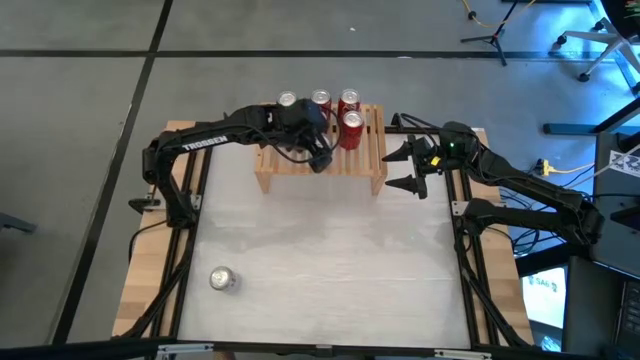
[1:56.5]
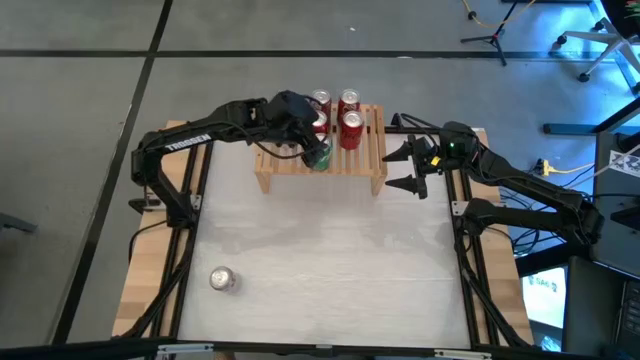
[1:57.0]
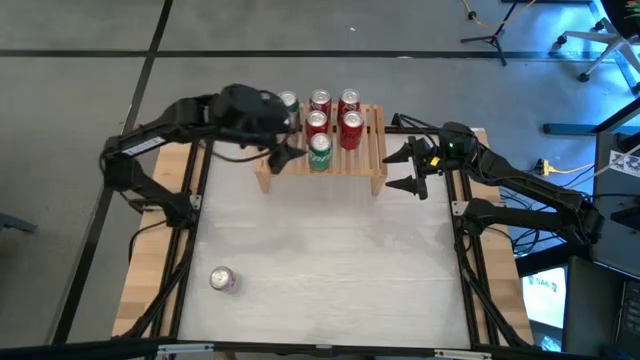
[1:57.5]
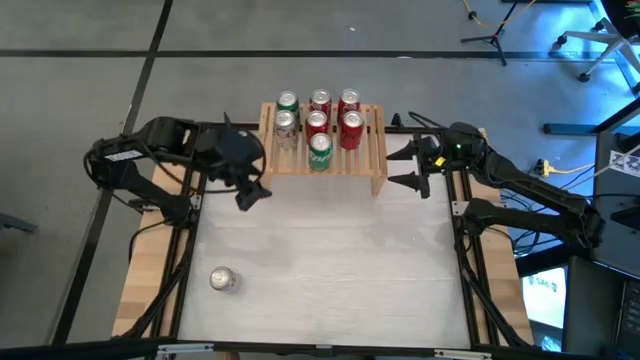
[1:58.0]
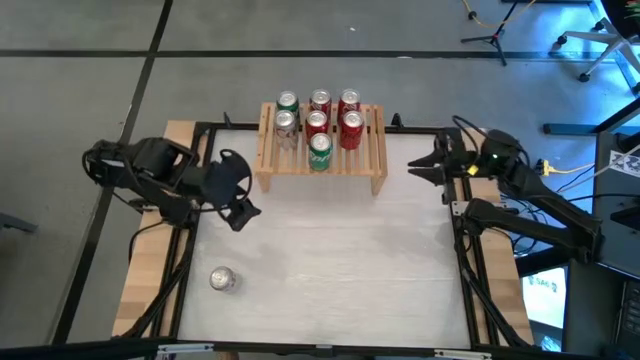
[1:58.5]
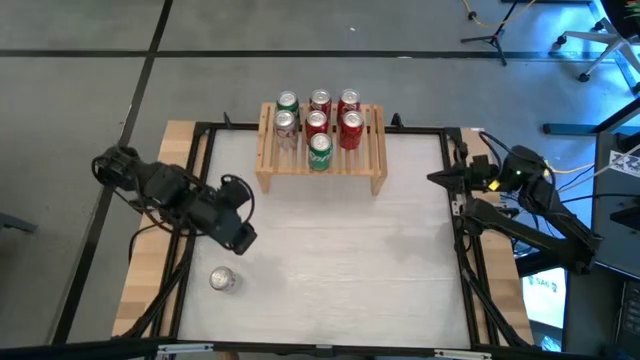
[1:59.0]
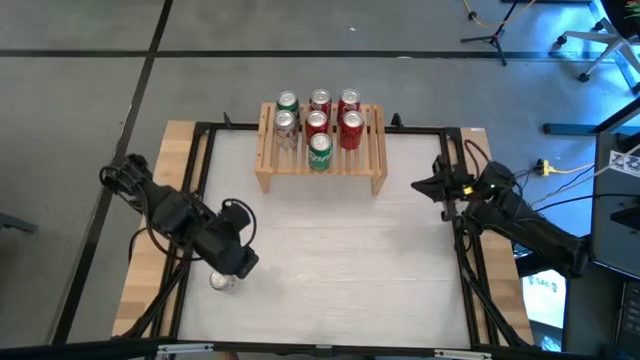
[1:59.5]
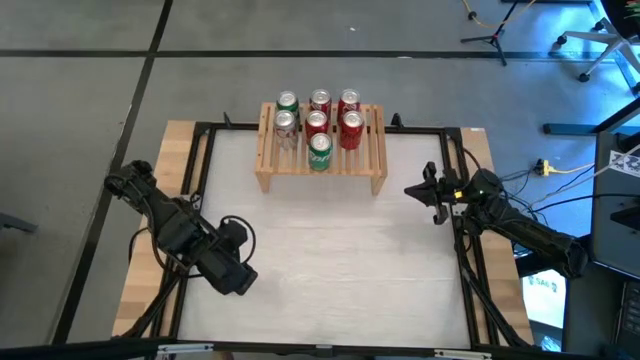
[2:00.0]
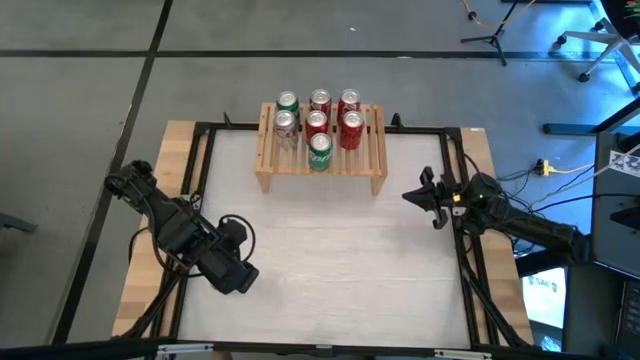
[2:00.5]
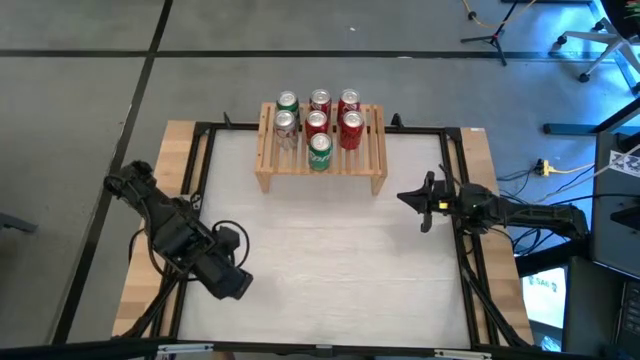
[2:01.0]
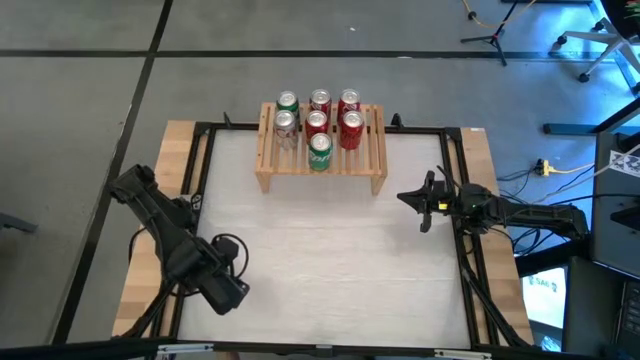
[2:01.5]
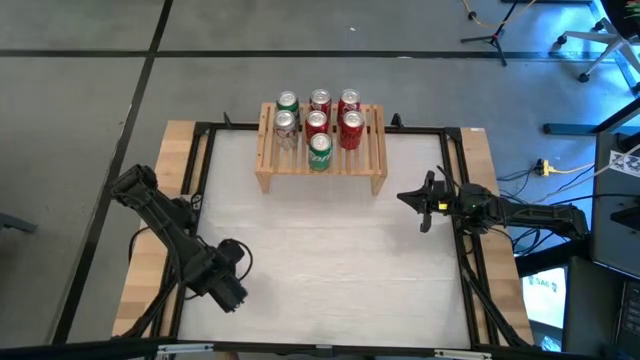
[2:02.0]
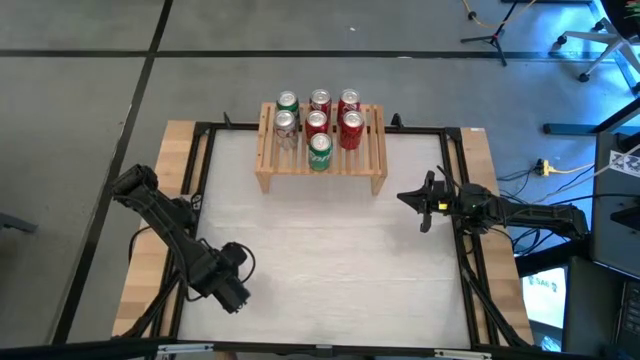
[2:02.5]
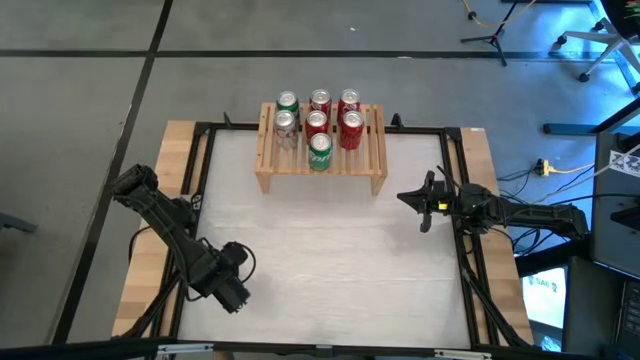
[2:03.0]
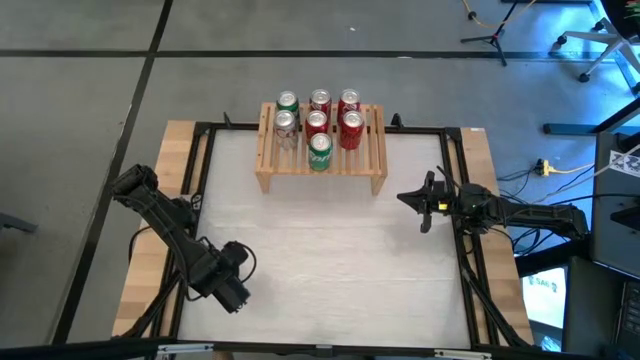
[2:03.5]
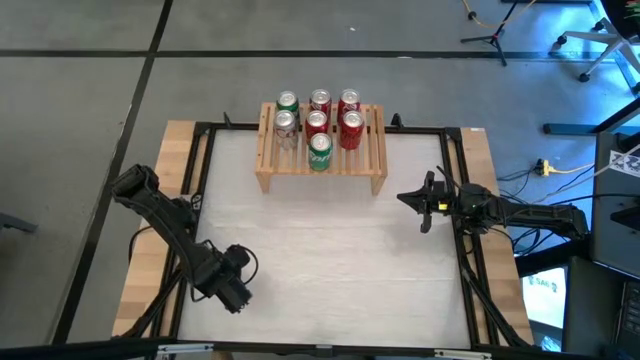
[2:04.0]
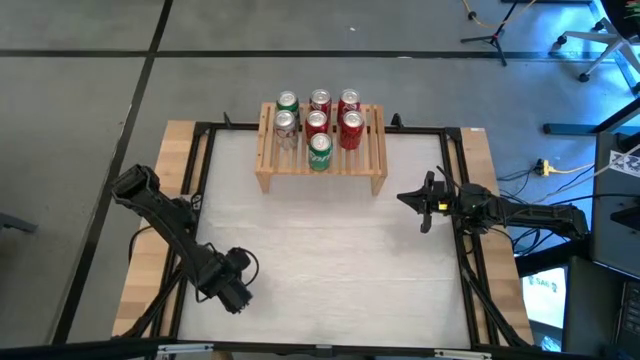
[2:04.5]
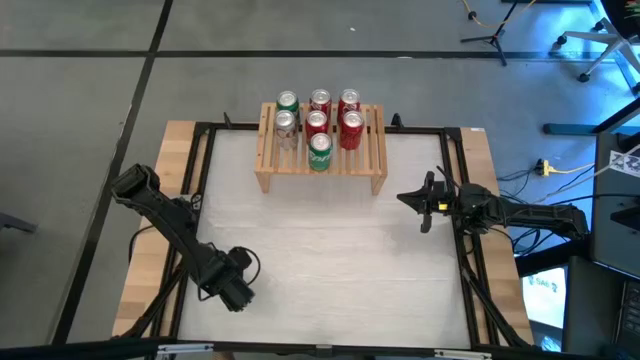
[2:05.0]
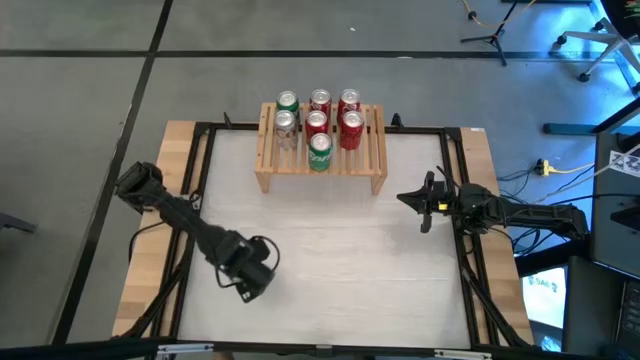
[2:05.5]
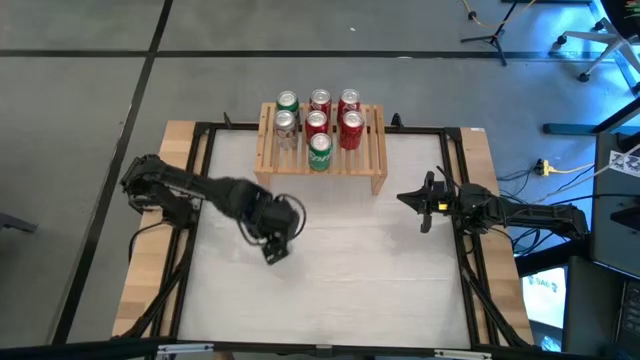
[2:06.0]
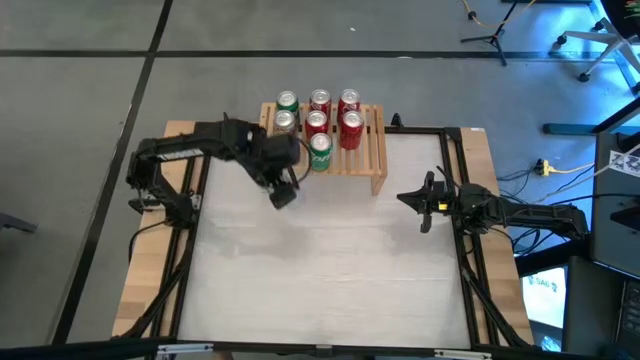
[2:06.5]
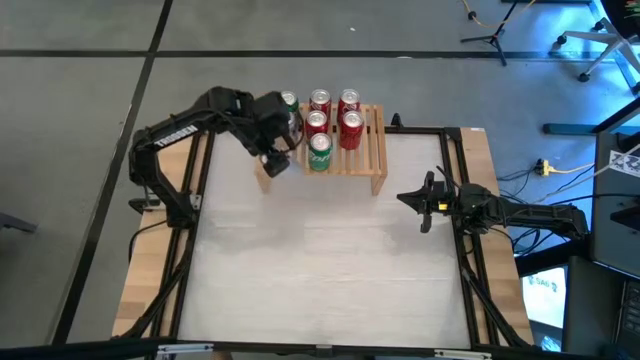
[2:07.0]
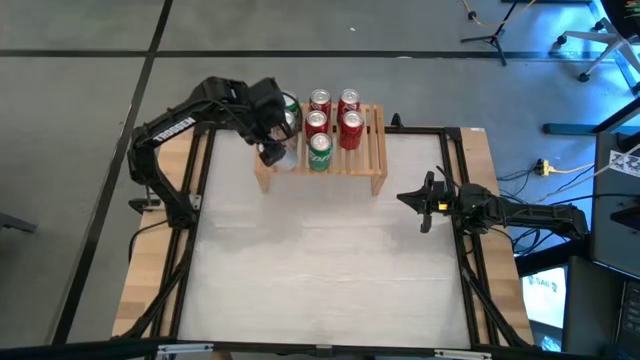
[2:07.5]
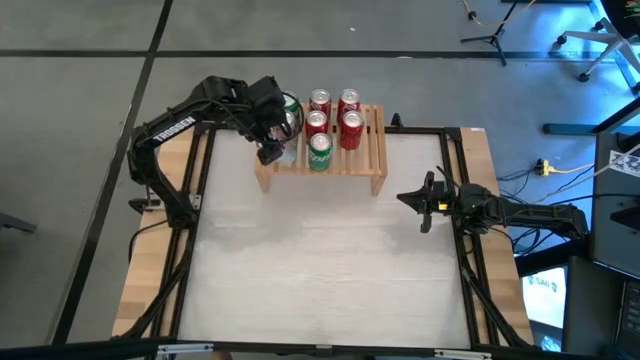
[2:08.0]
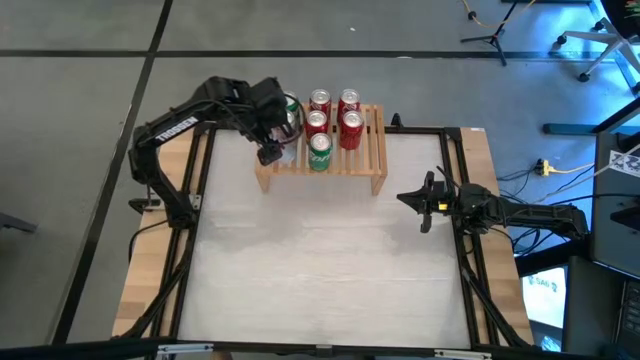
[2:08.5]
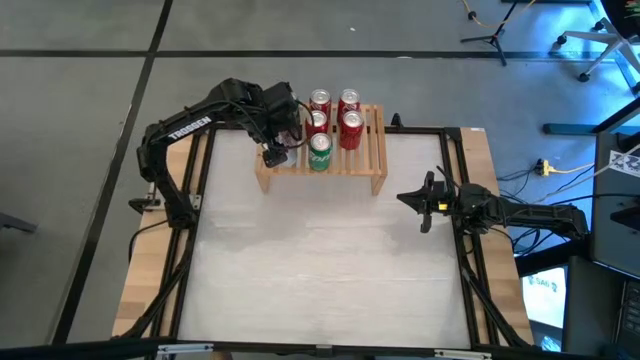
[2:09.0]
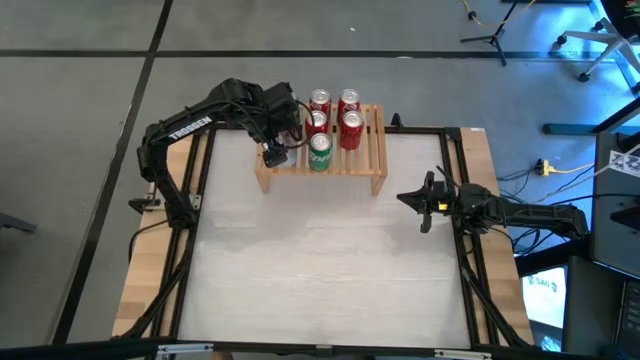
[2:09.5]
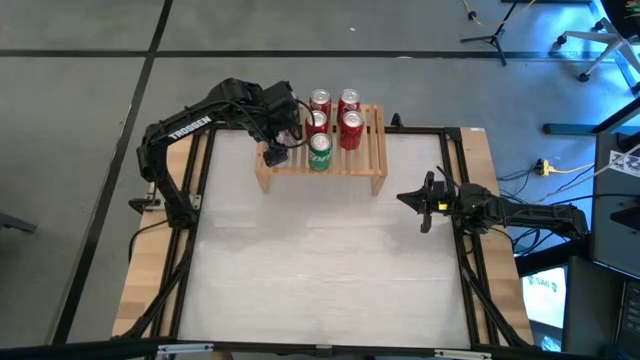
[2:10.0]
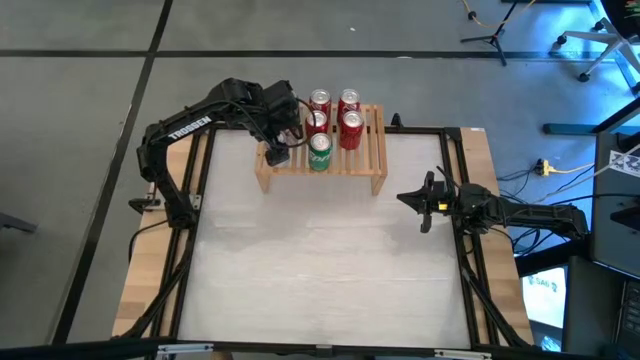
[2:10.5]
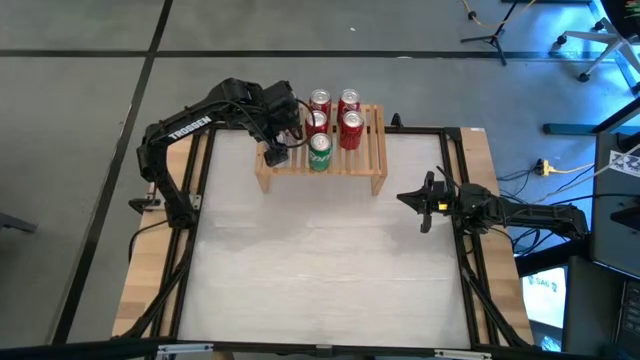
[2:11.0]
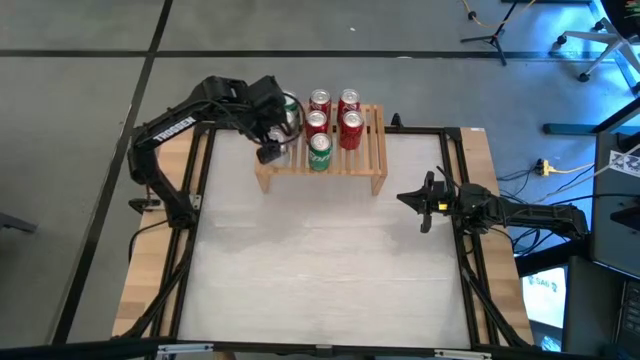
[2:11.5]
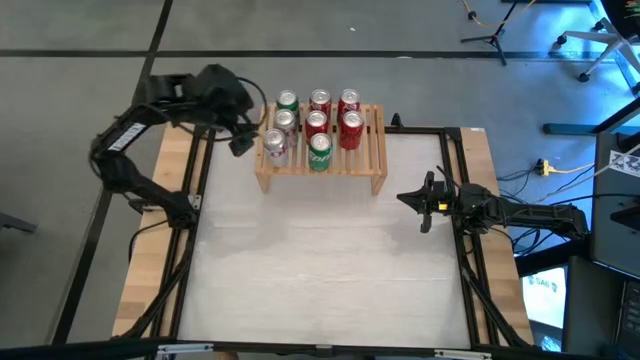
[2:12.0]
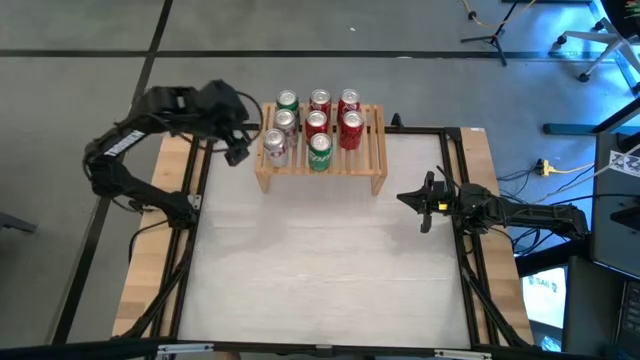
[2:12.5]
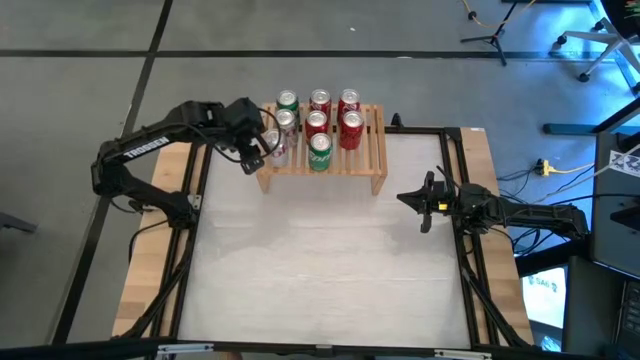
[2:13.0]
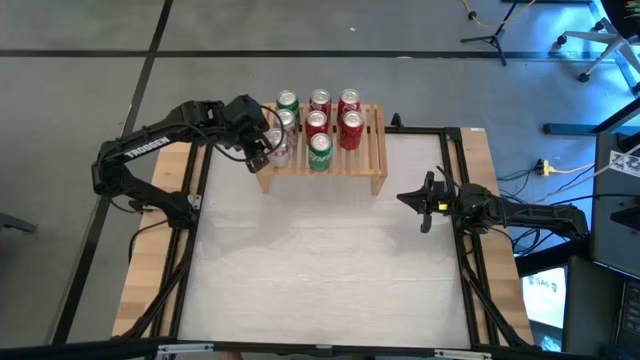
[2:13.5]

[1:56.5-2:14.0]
Task: Place canned beverage on shelf
Put the silver/red soda can on the shelf aligned with the silver/red soda can

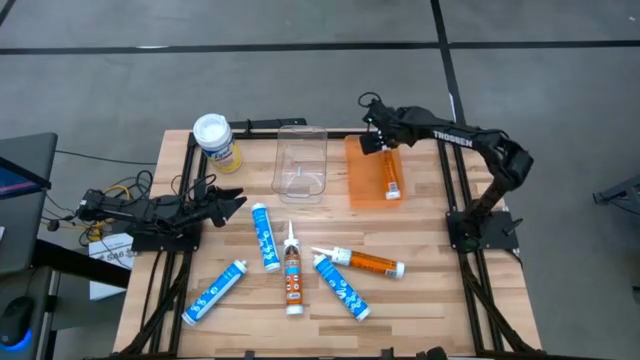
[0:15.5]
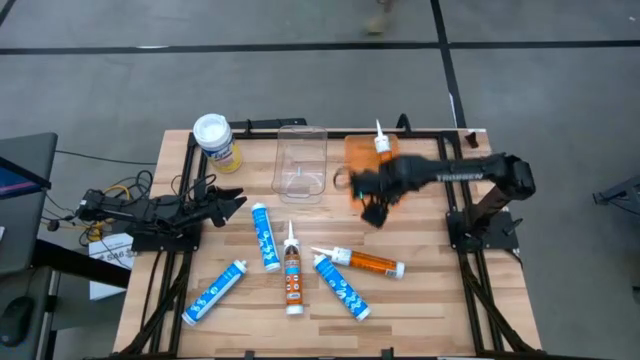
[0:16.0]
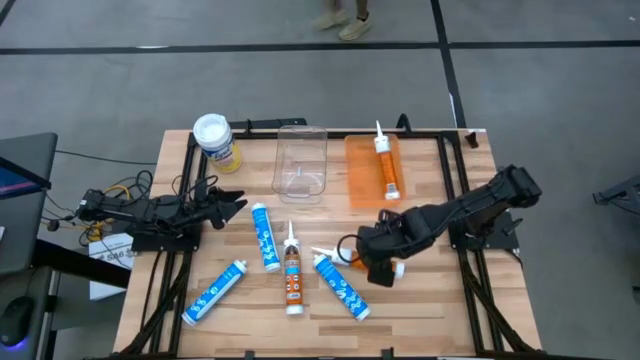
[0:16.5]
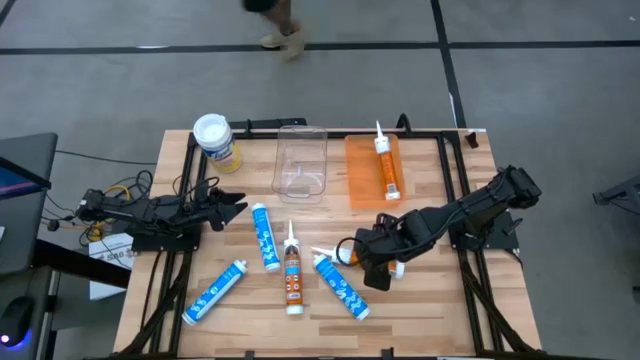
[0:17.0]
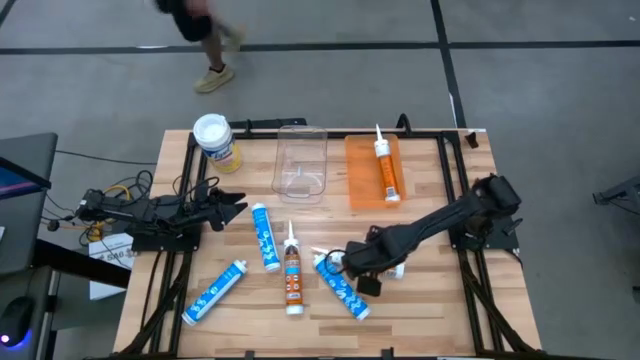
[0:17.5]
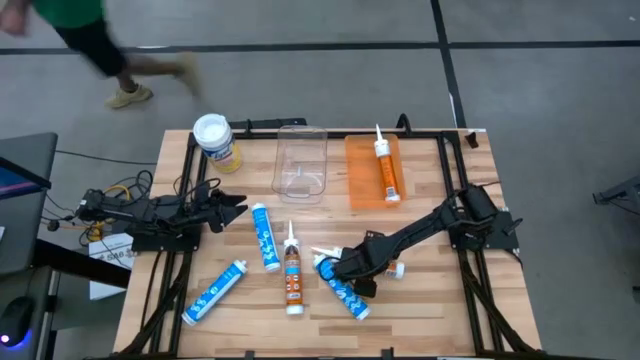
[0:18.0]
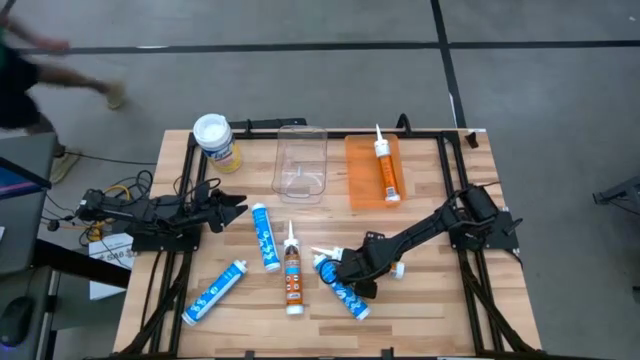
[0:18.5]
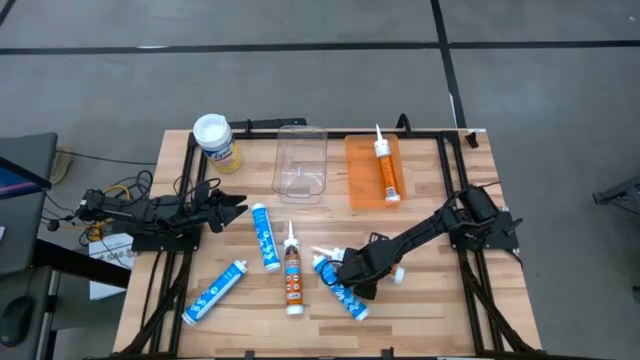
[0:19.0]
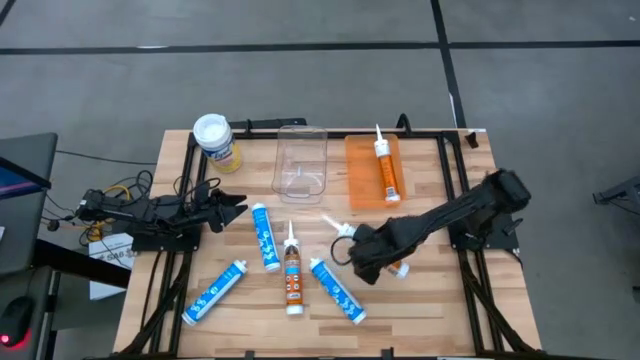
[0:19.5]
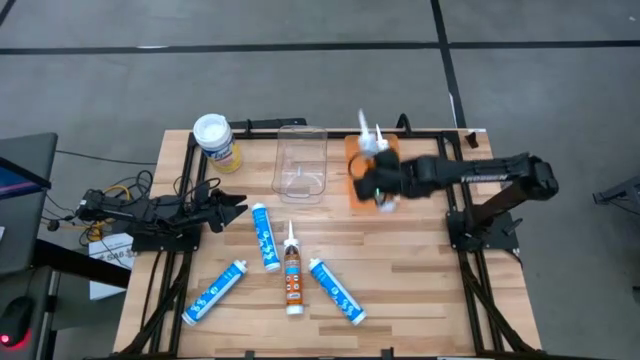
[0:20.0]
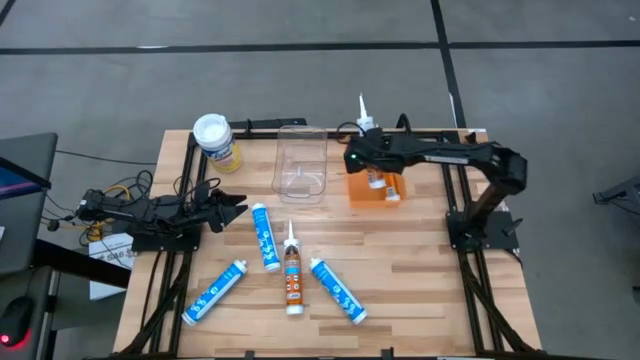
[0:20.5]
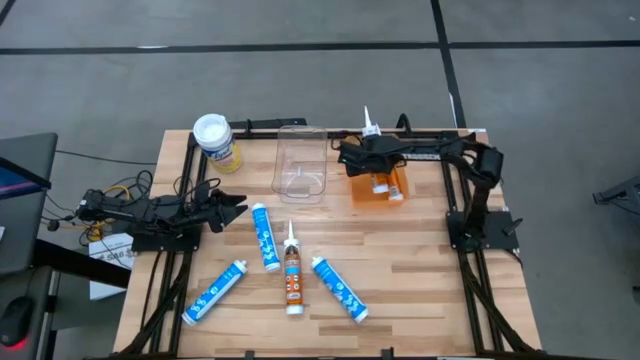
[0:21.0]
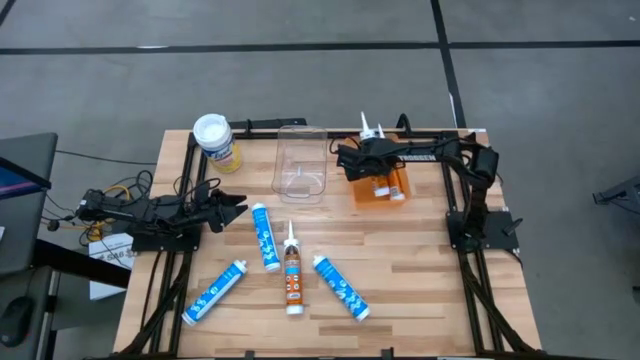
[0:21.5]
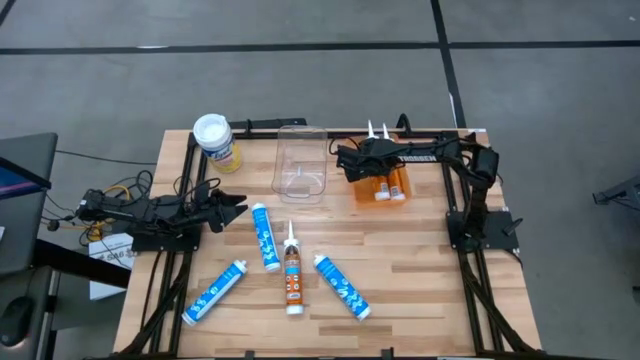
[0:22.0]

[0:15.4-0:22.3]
Task: Pick & place silicon tubes, Sealant and Lysol wipes
Put the right orange sealant into the orange bin
